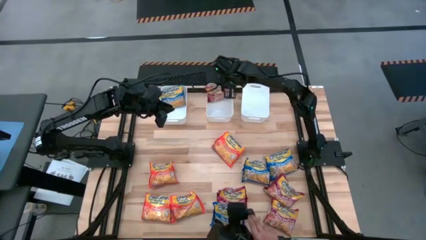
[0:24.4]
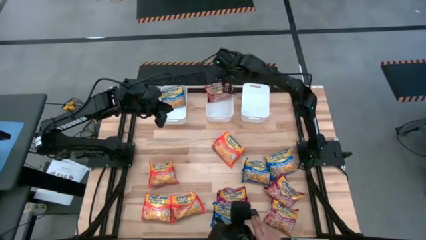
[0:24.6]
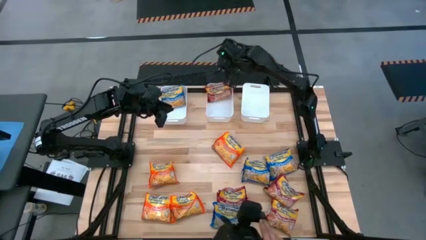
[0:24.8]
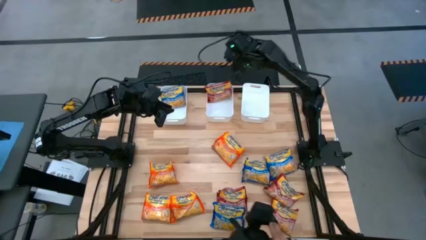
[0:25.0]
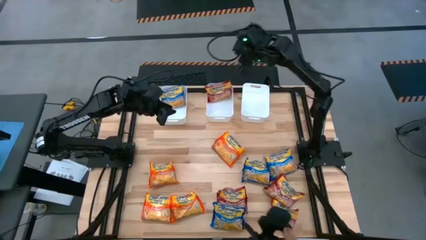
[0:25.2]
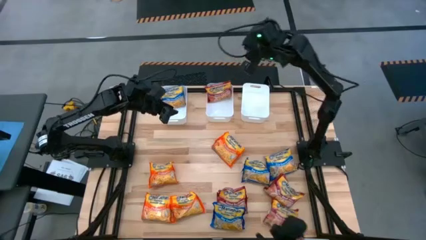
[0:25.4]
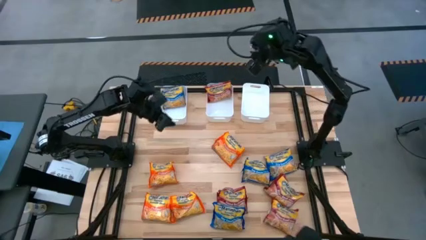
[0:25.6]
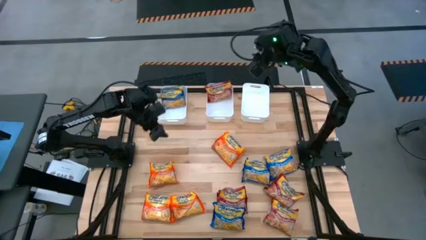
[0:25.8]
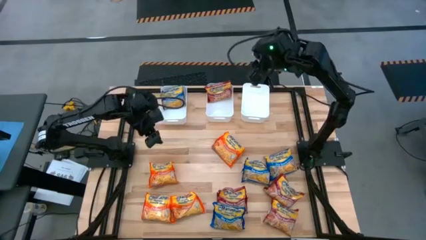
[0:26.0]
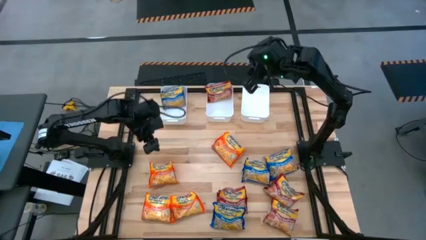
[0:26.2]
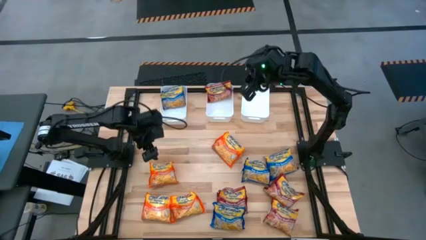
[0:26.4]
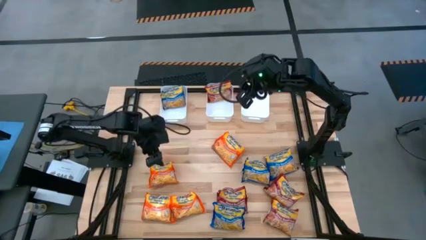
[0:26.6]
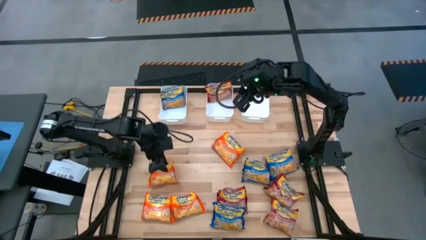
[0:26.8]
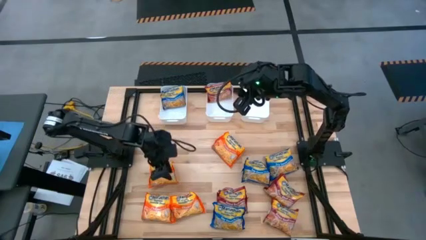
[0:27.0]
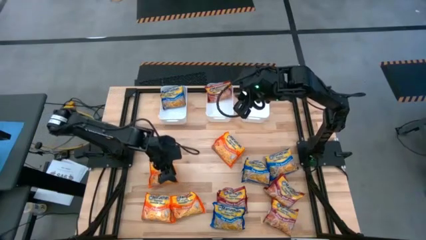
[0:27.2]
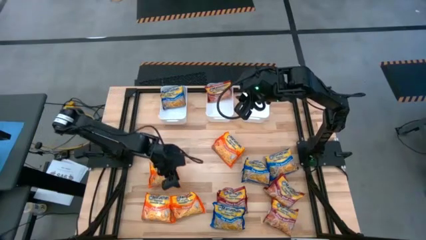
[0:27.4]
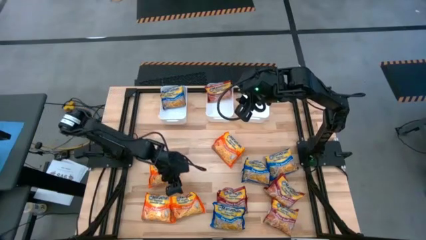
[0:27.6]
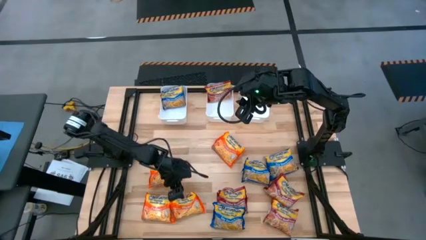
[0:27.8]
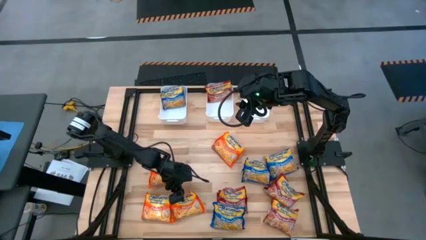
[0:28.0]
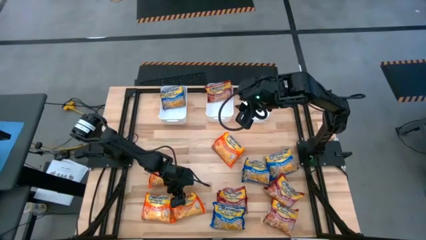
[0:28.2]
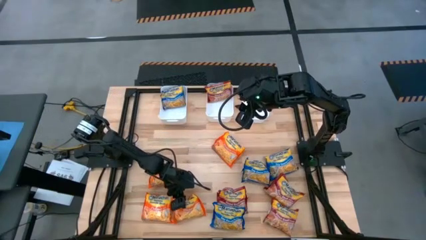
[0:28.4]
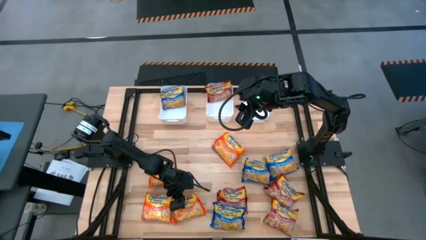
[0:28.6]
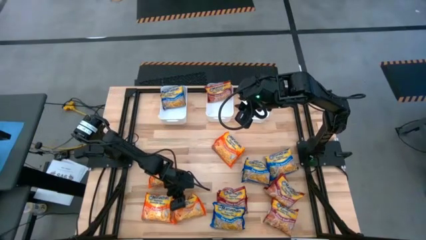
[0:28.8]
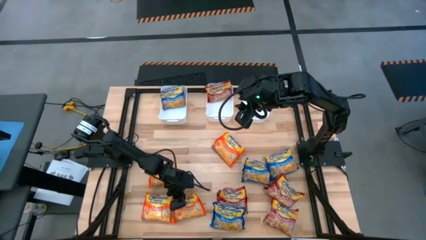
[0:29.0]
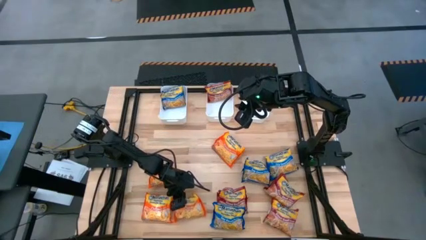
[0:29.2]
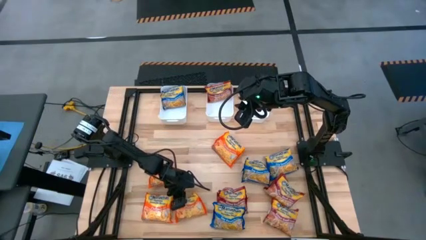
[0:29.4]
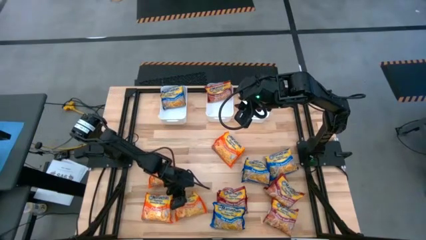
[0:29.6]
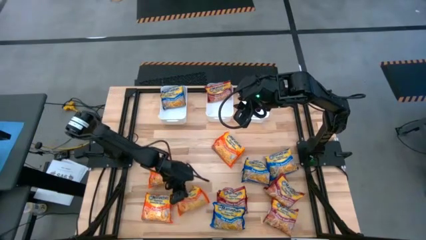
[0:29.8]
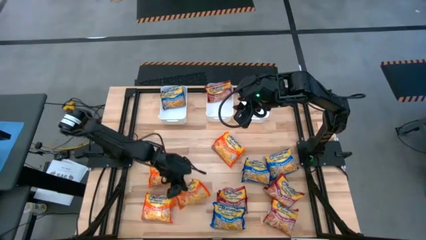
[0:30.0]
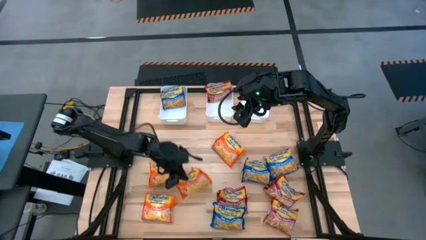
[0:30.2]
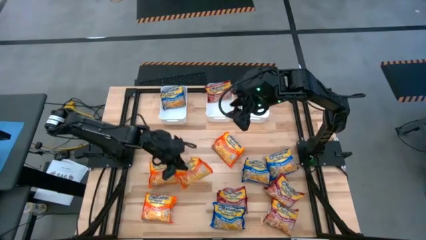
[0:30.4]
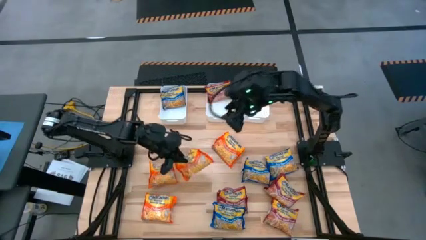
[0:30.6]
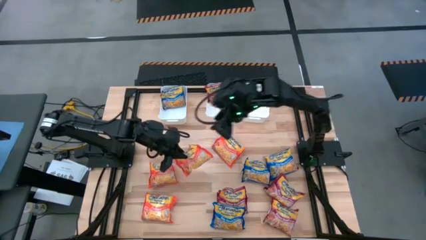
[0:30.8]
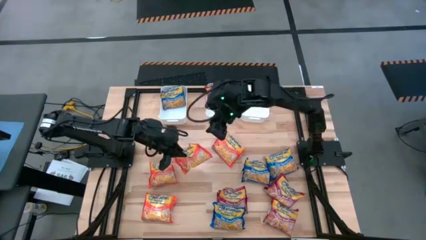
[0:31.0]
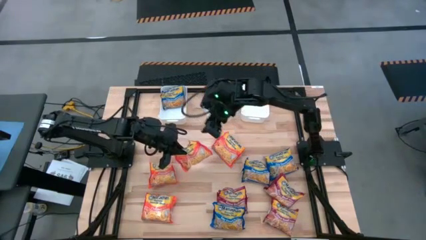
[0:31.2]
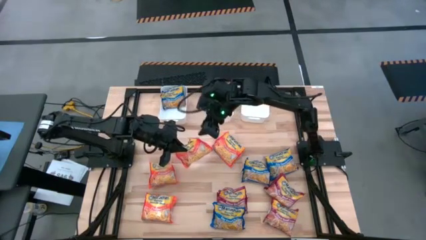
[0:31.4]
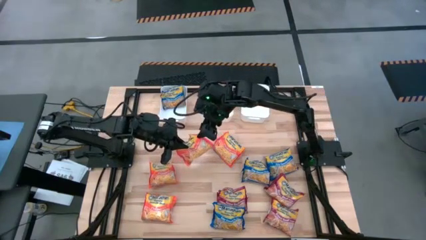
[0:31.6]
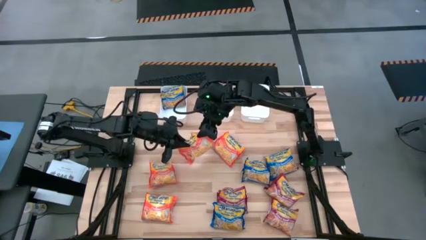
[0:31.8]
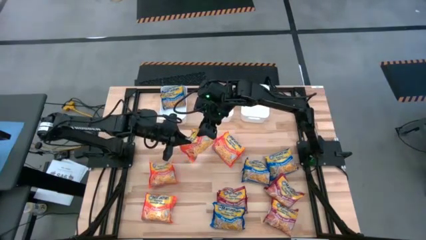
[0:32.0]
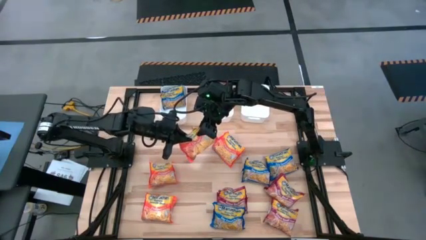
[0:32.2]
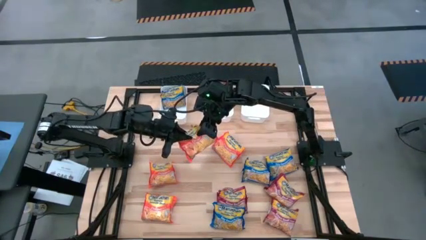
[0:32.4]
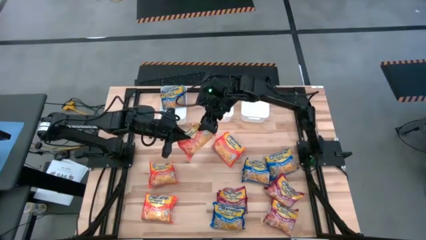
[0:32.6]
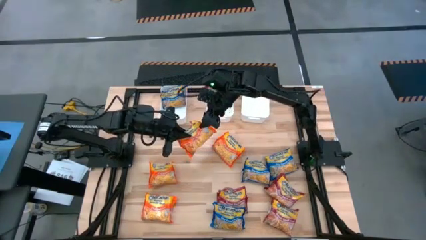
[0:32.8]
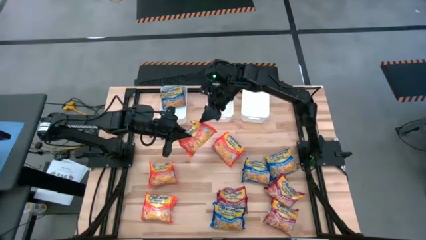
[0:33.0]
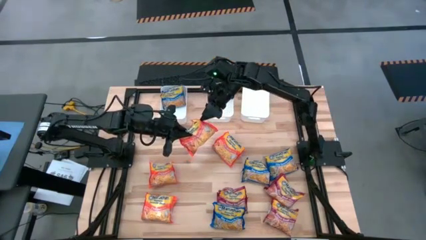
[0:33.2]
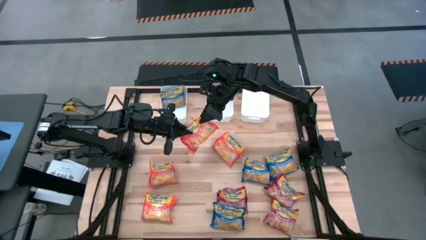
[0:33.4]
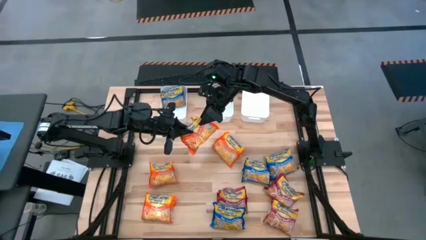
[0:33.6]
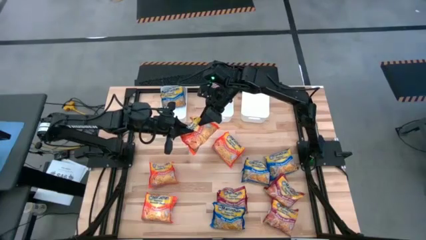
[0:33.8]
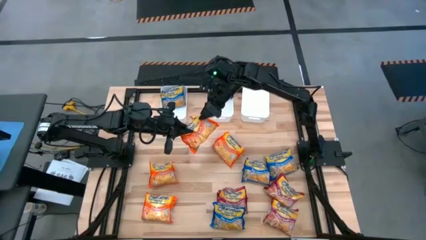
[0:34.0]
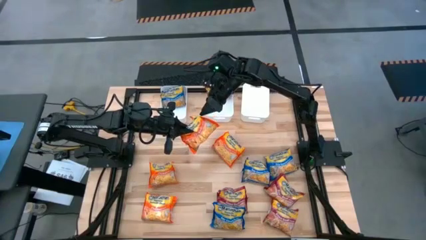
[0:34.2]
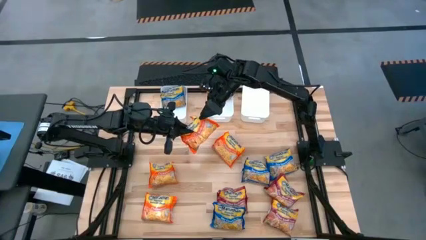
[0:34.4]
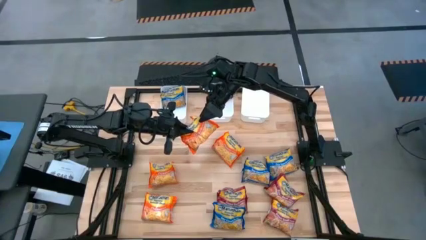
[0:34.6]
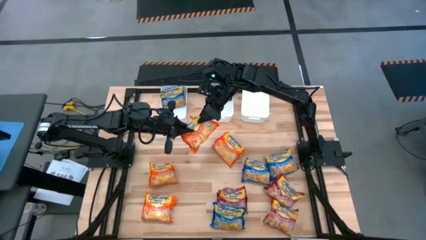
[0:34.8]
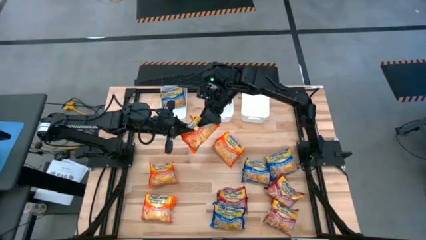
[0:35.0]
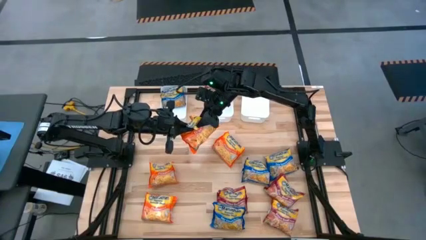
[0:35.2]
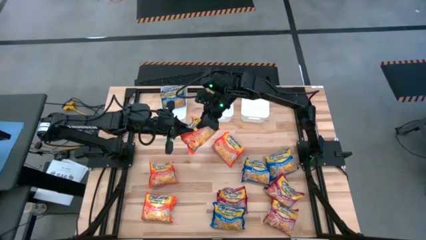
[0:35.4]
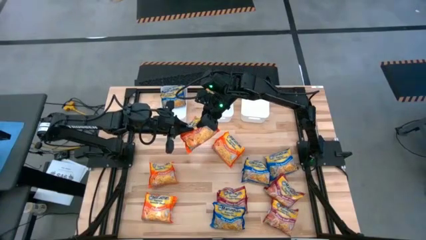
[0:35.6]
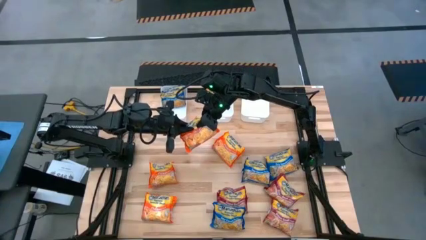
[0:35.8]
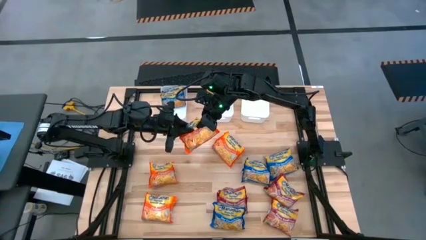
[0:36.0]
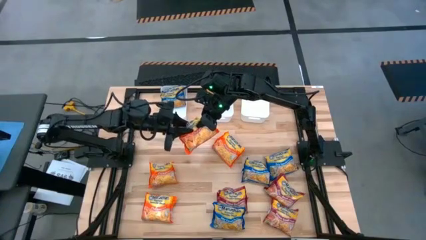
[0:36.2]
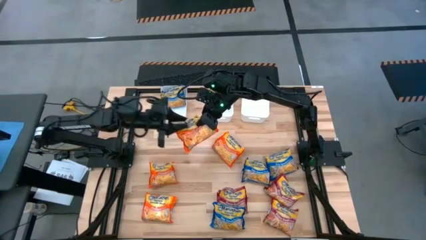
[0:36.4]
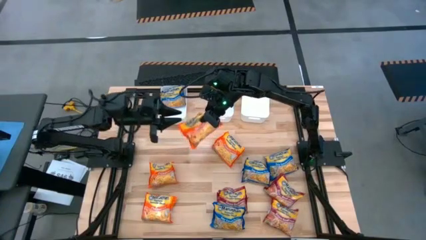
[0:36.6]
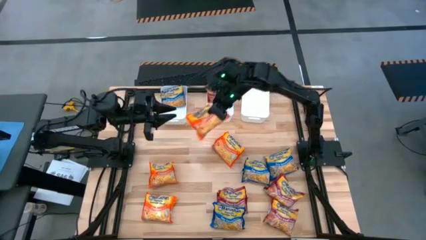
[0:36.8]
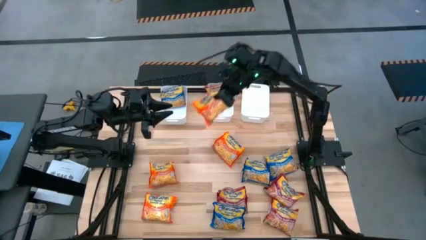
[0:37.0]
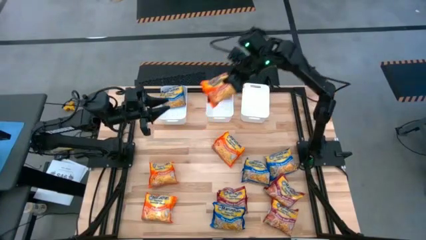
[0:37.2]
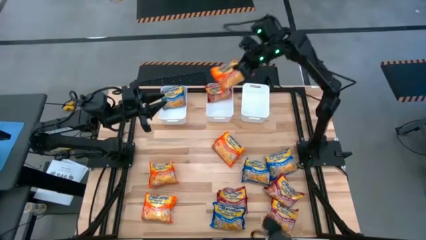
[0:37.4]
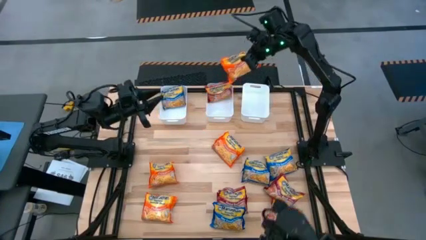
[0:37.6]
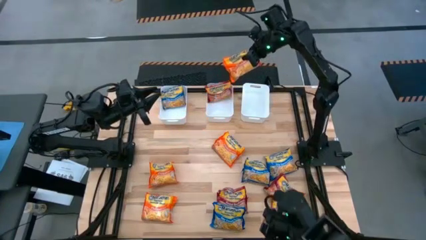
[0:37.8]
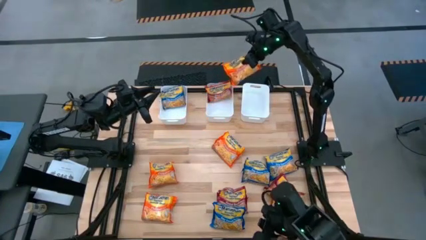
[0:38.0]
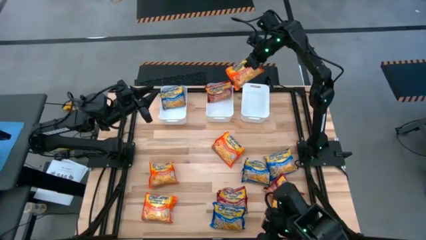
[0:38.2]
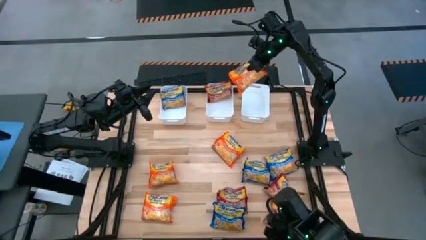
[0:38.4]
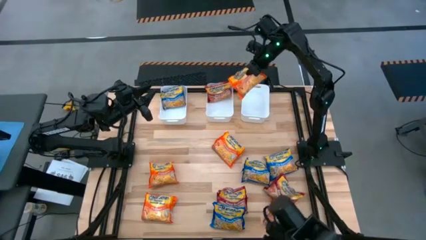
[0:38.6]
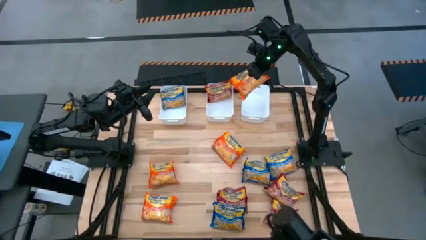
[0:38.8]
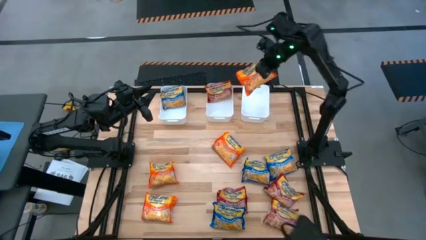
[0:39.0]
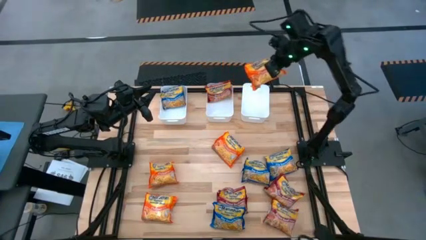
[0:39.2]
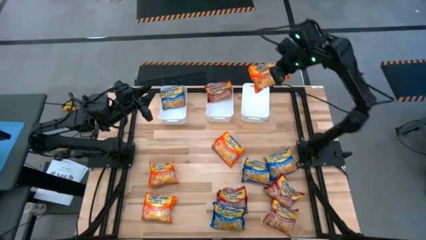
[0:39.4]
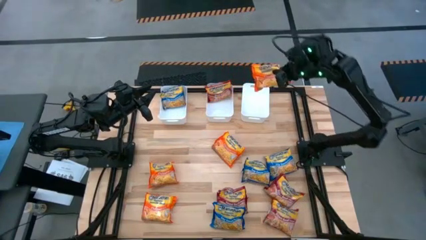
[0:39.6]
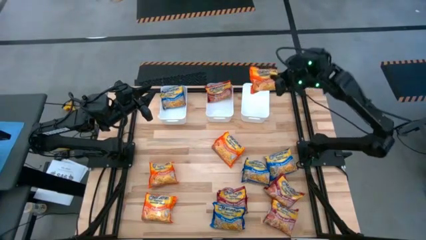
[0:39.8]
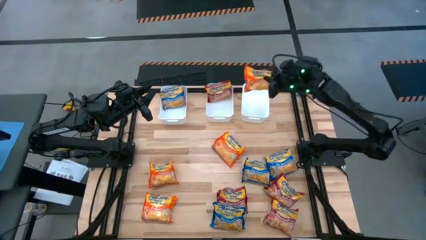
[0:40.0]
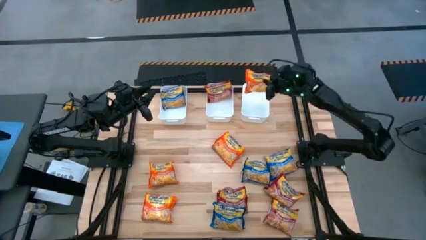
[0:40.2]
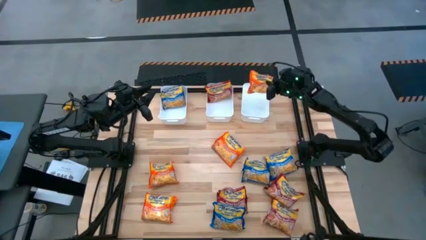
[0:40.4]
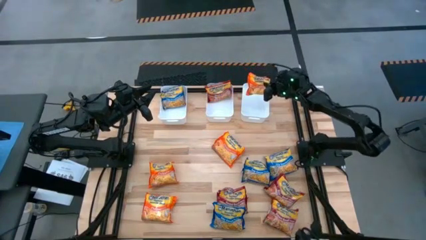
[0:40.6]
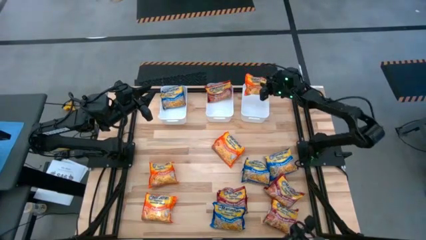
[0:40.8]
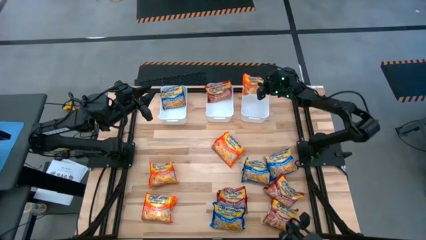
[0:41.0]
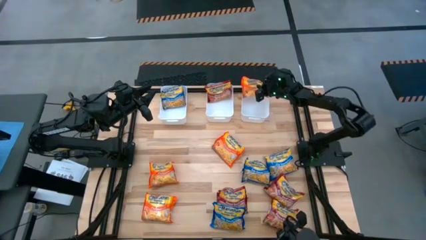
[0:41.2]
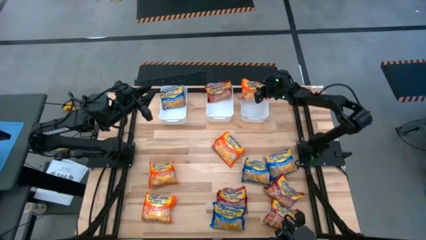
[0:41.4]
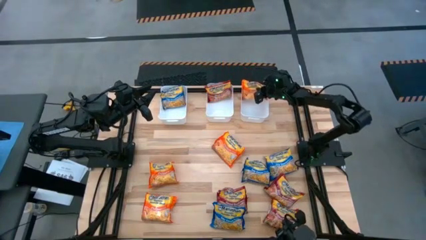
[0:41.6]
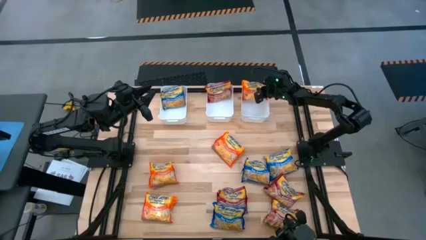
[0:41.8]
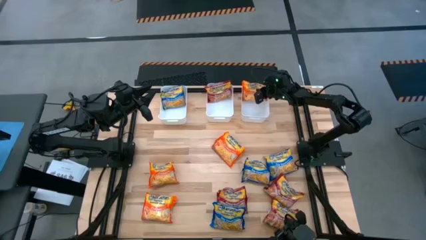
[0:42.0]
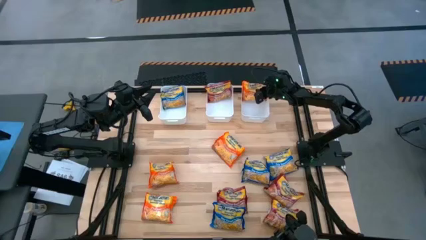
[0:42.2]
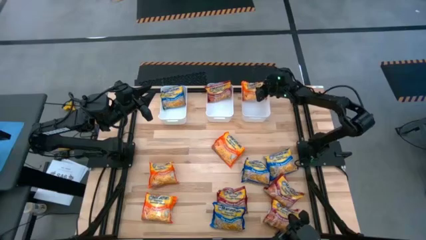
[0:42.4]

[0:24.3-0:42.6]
Task: Sort Maruchan noodles
Put the orange noodle pack into the right white bin
